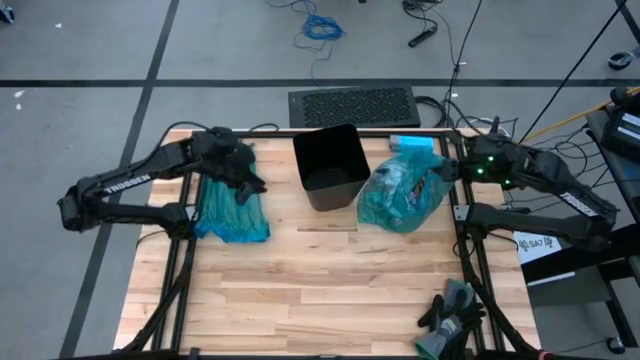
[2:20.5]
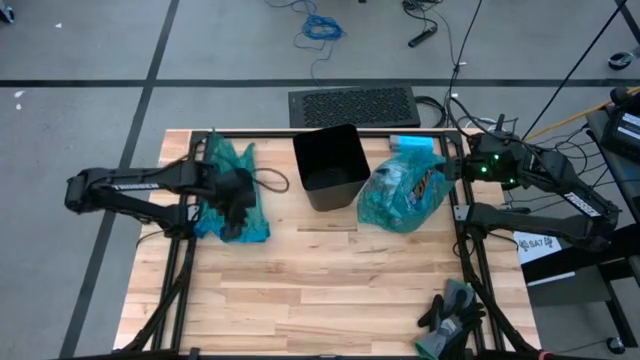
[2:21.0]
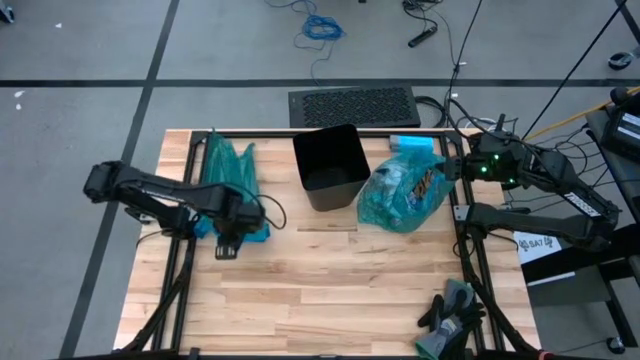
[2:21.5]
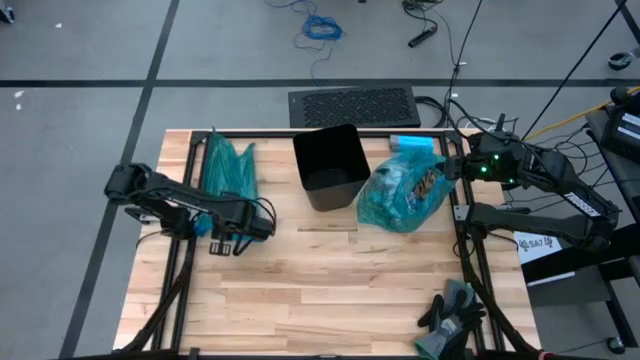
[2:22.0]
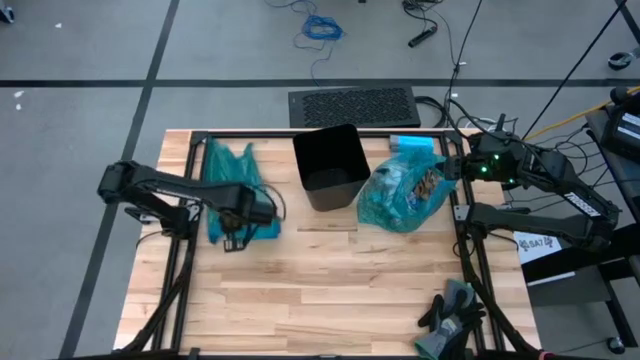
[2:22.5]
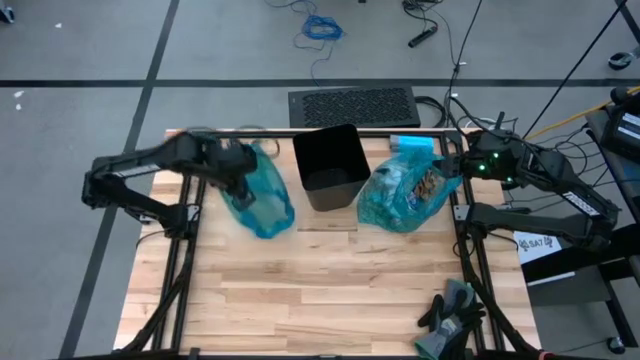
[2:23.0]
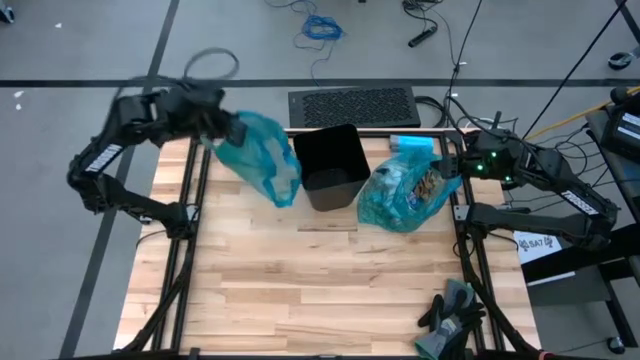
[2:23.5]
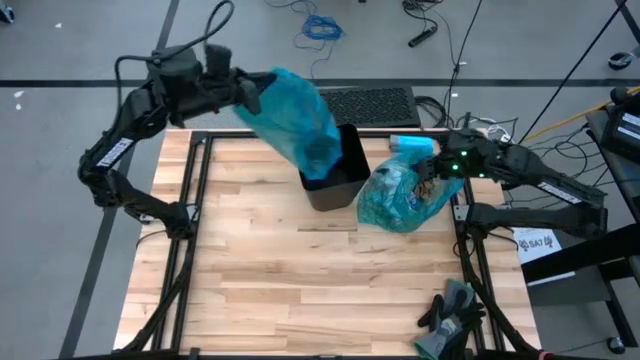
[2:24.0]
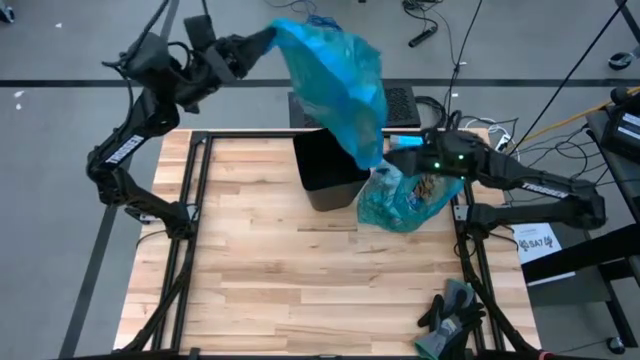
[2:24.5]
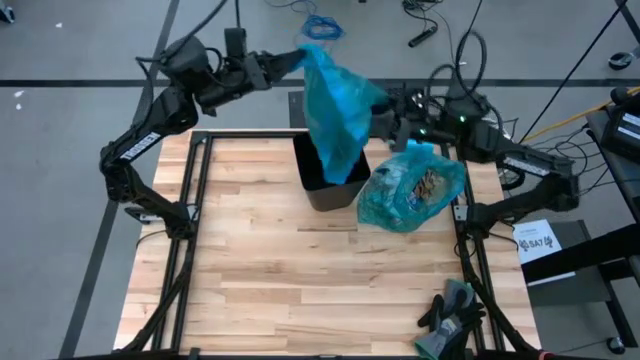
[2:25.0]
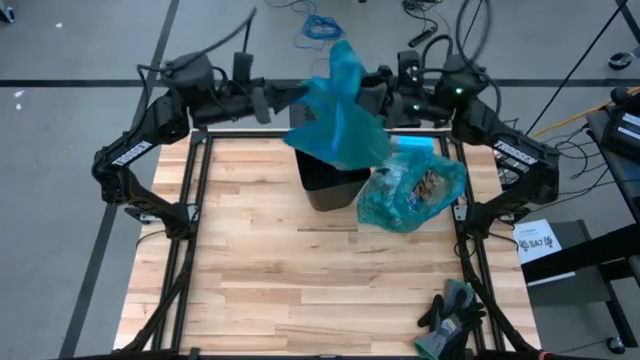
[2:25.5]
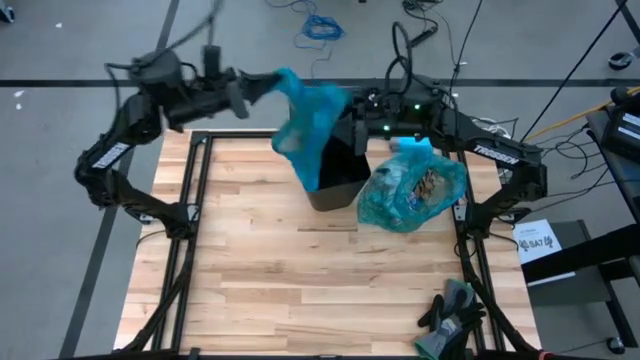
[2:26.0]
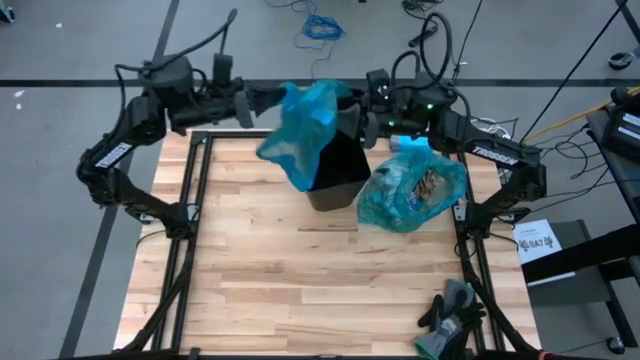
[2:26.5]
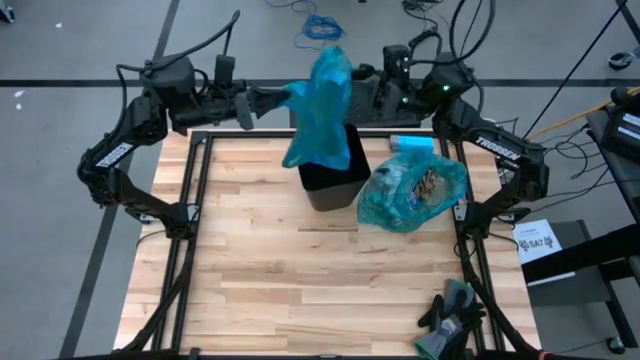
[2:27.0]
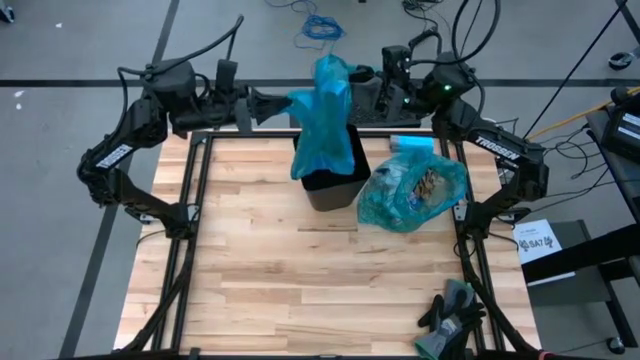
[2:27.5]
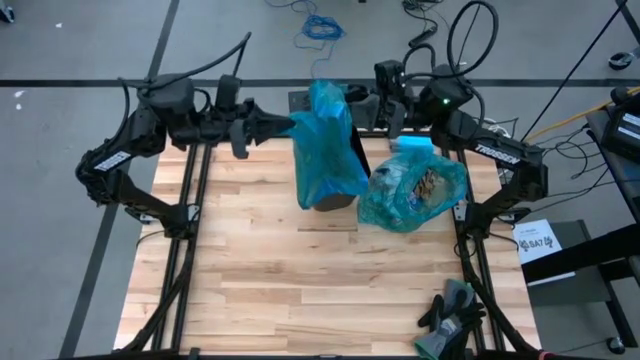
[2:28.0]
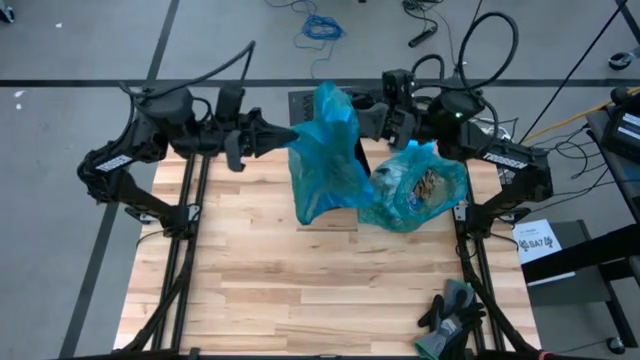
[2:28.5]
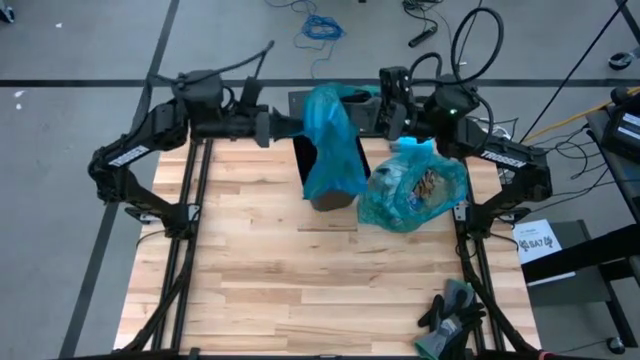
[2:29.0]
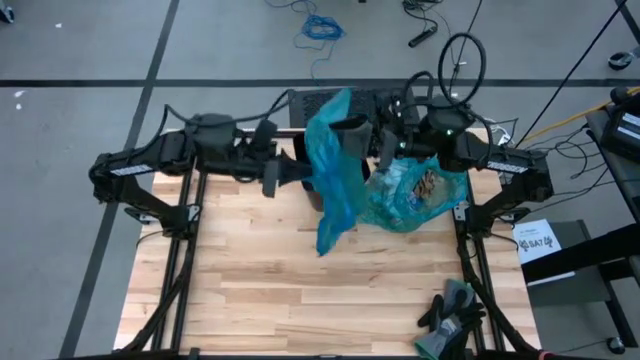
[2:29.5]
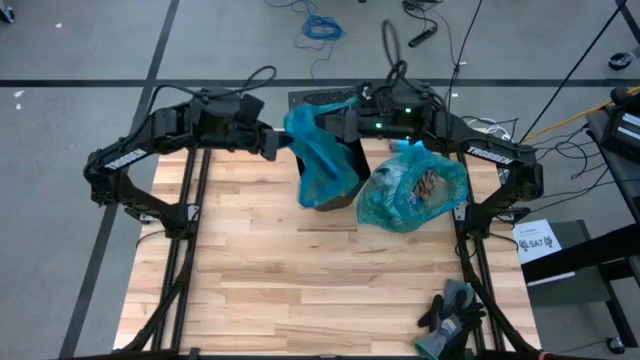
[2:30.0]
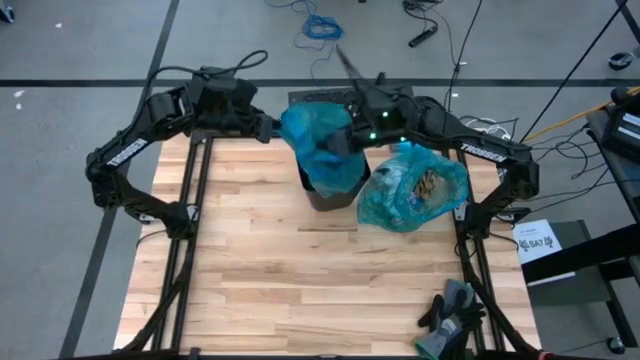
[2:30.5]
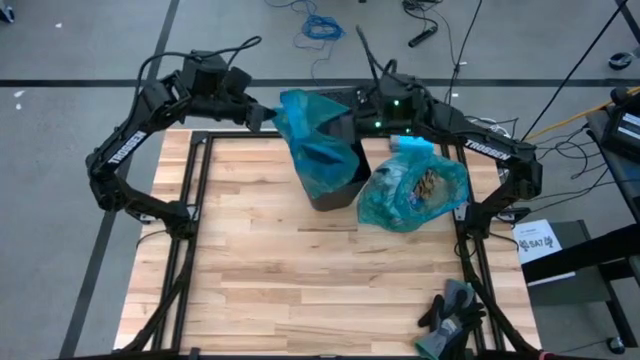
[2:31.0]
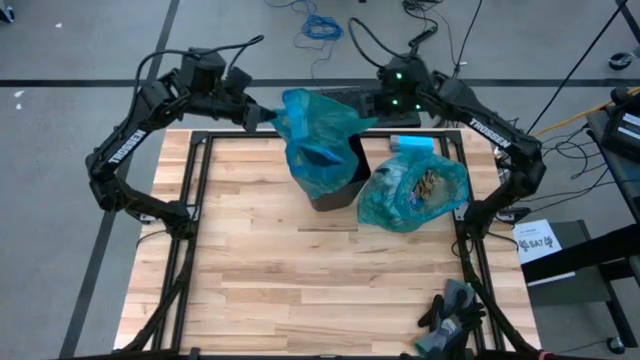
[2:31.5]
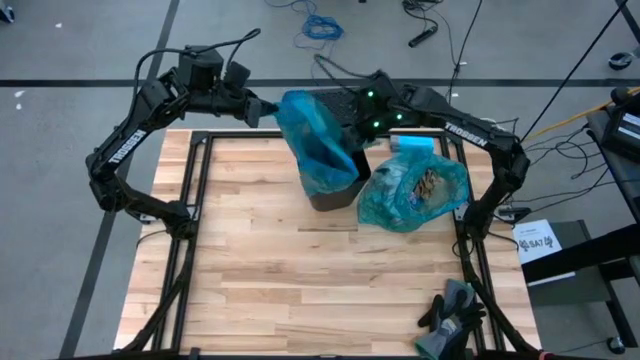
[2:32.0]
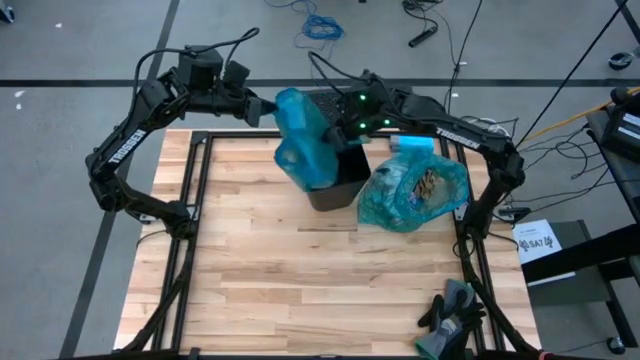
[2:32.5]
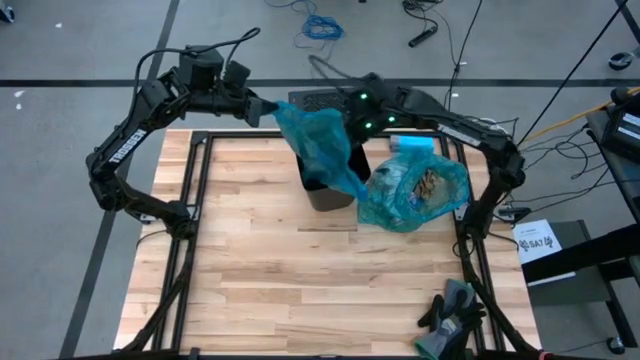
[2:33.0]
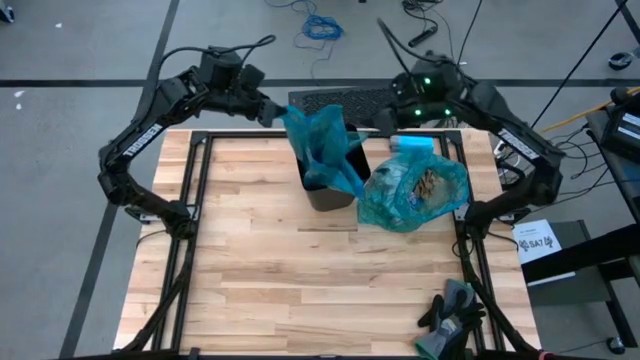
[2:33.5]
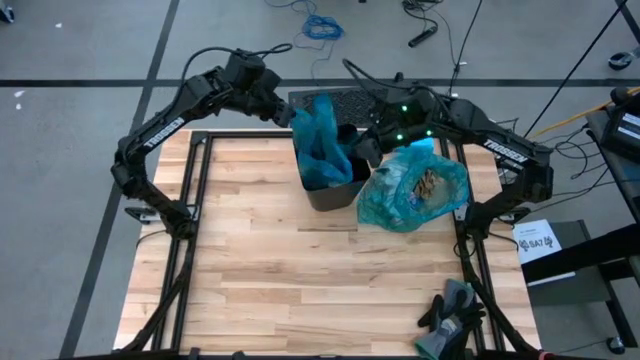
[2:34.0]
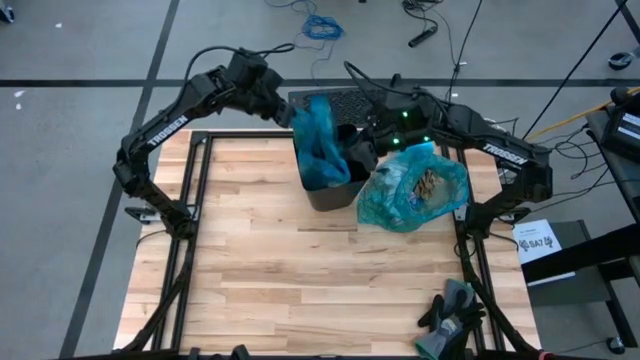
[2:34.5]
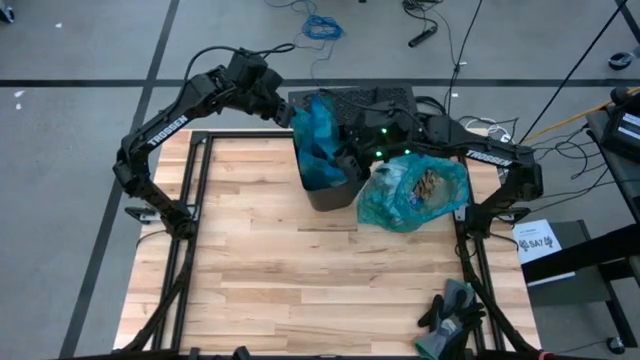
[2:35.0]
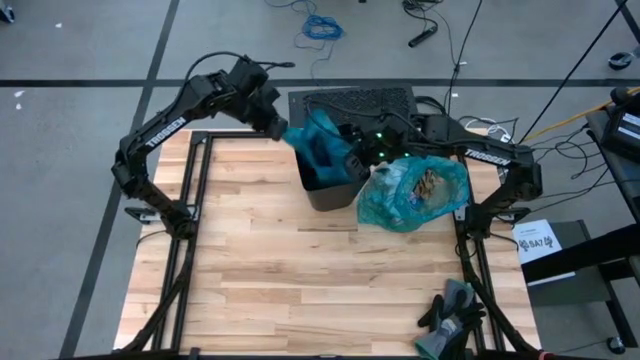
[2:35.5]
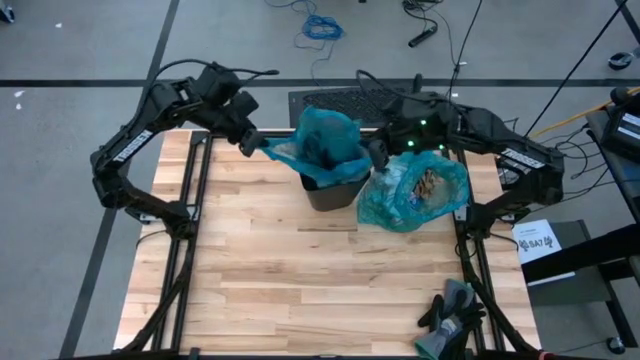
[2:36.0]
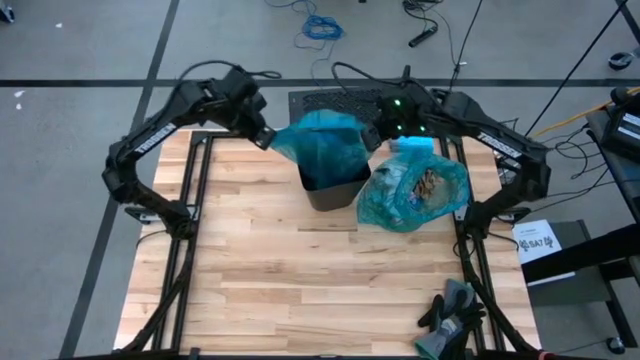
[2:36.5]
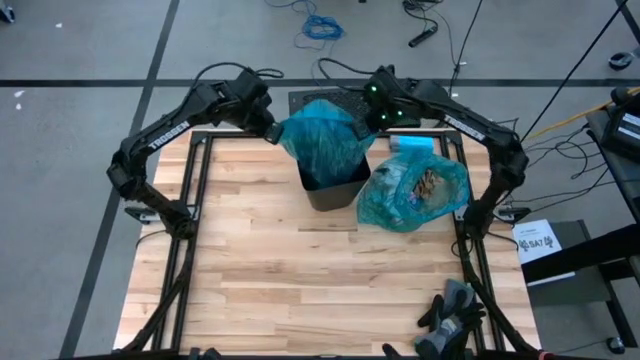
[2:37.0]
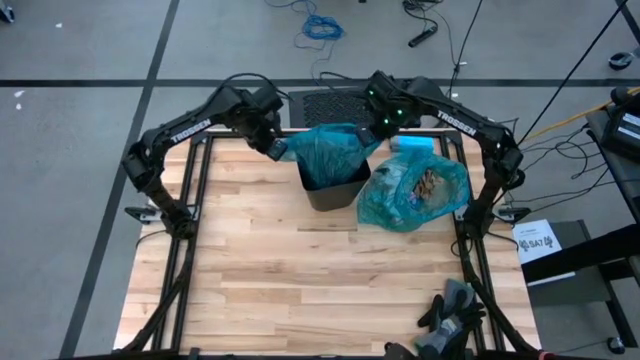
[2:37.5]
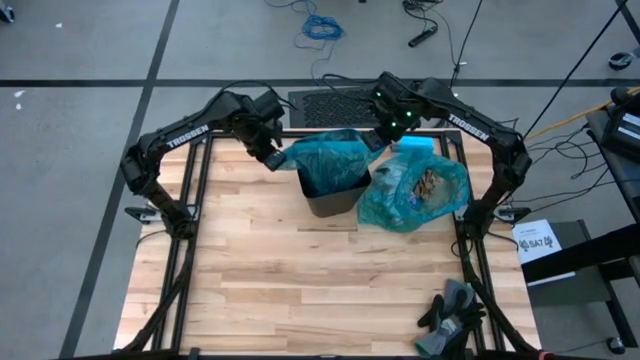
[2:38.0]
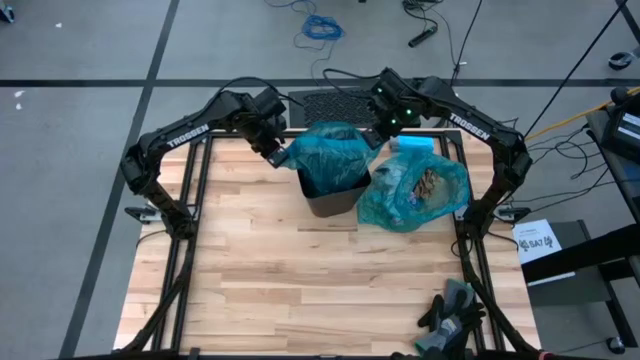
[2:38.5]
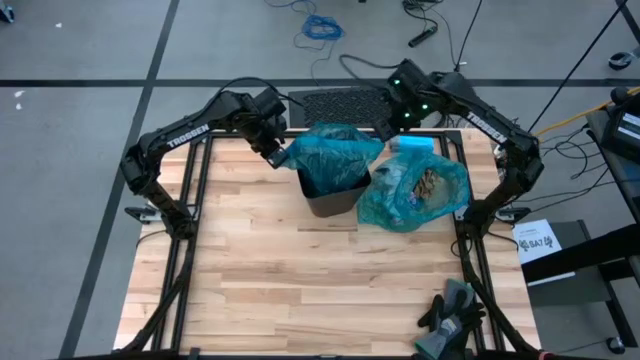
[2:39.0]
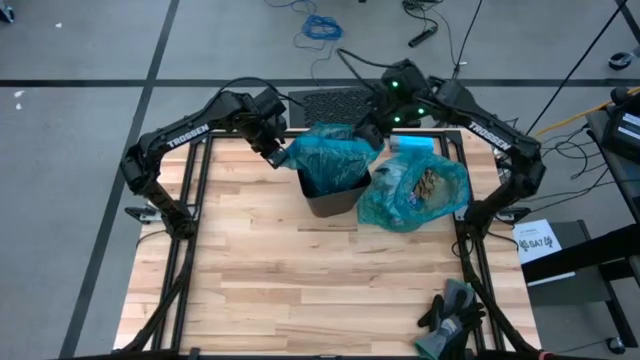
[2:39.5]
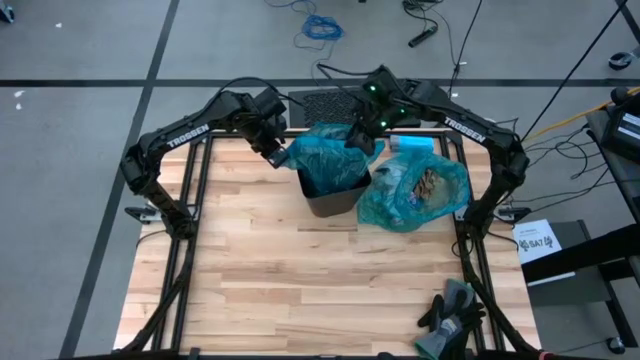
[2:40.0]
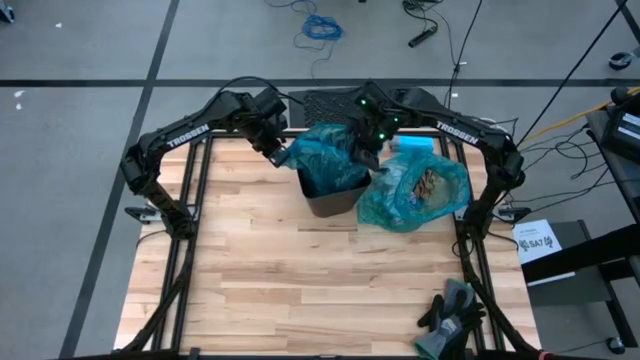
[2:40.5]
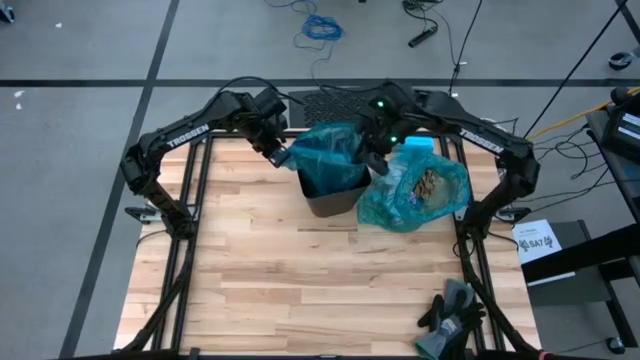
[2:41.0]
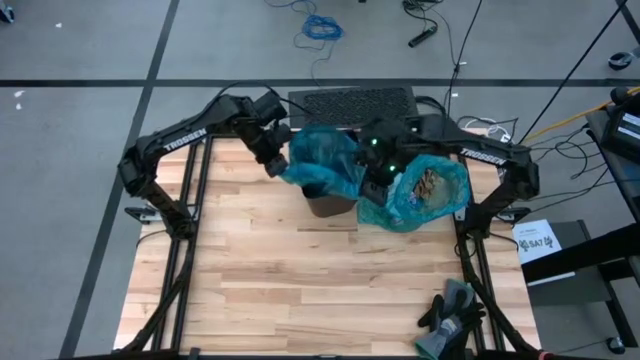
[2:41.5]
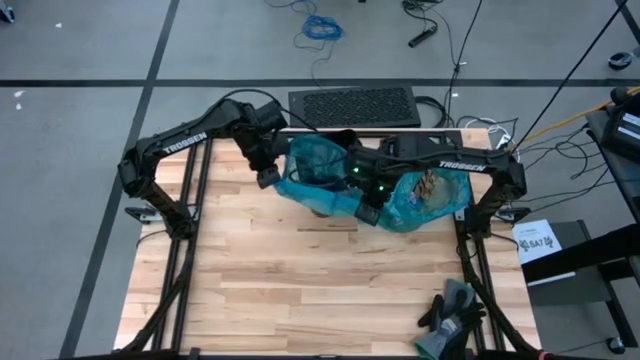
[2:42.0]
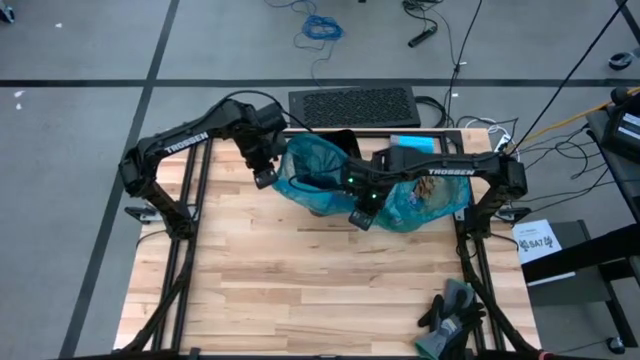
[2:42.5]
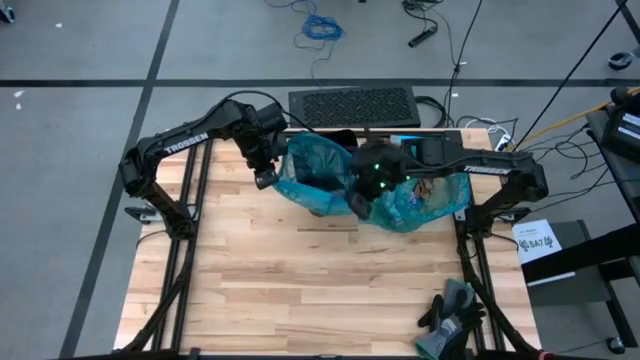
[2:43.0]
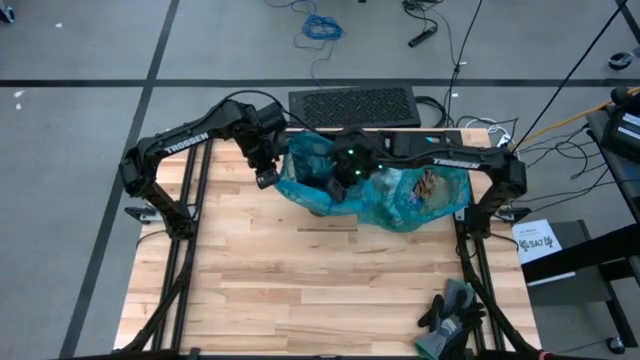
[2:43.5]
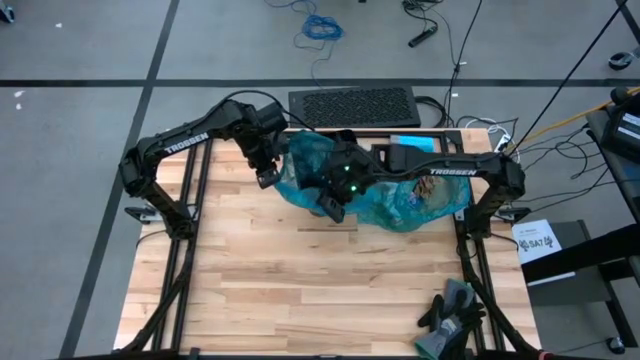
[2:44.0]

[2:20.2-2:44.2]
Task: place trash/remove bag and relplace
Put the blue trash bag into the black trash bin
